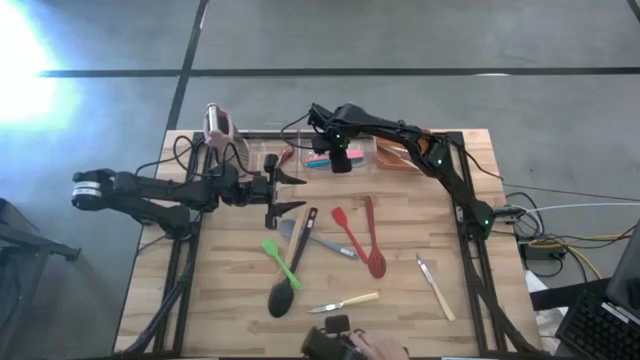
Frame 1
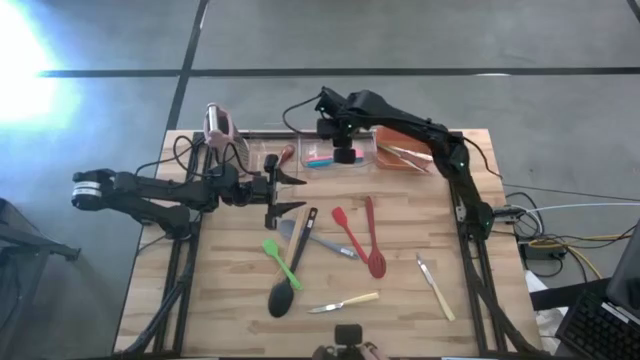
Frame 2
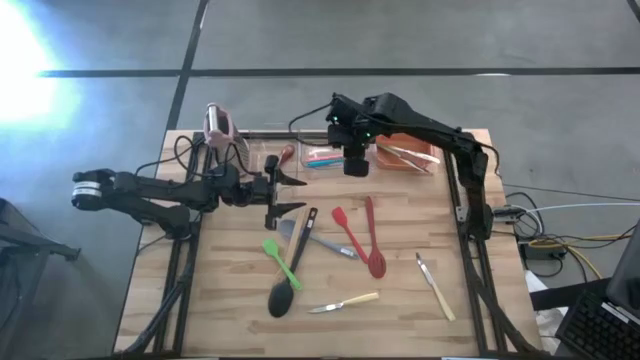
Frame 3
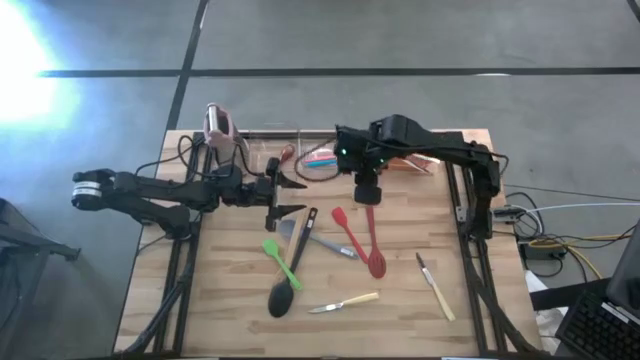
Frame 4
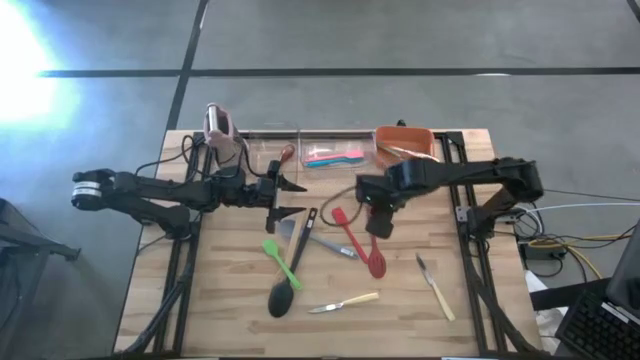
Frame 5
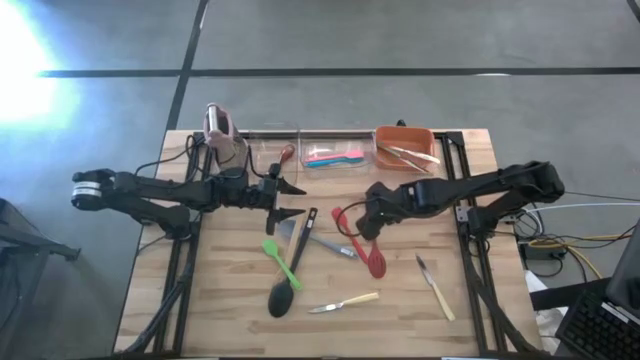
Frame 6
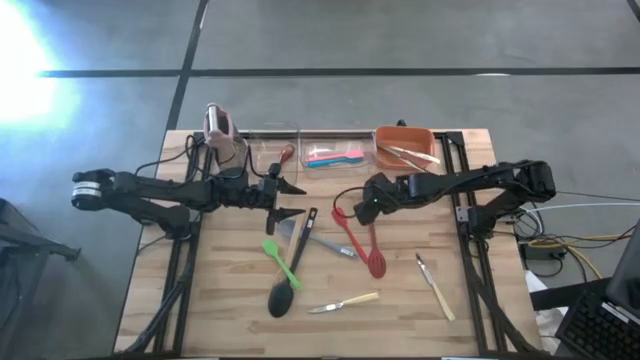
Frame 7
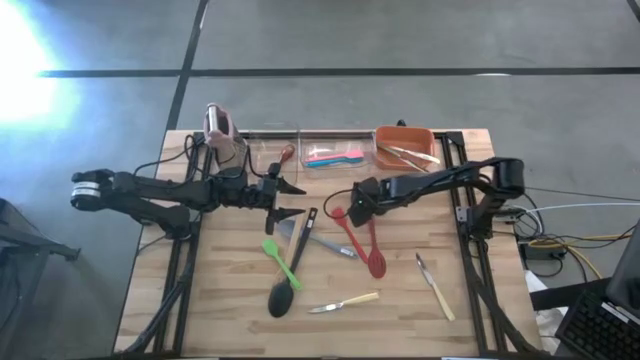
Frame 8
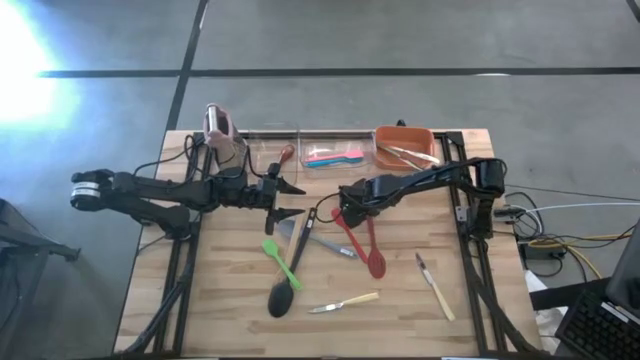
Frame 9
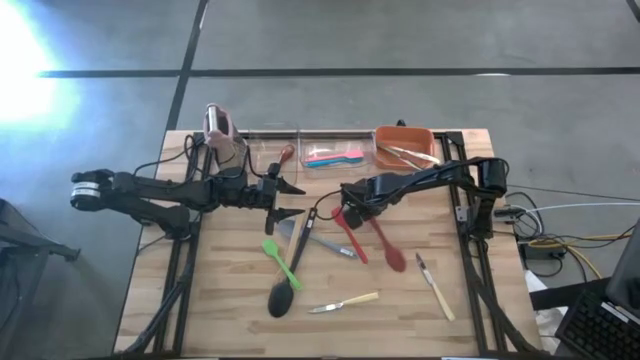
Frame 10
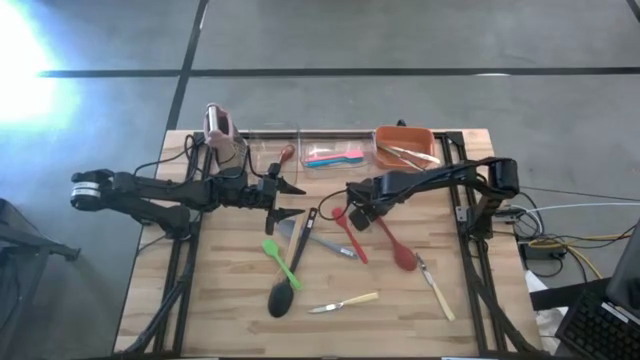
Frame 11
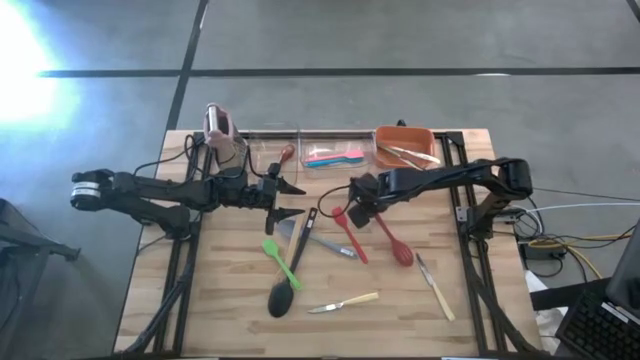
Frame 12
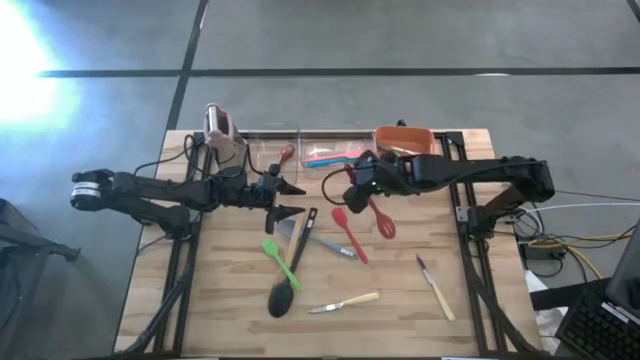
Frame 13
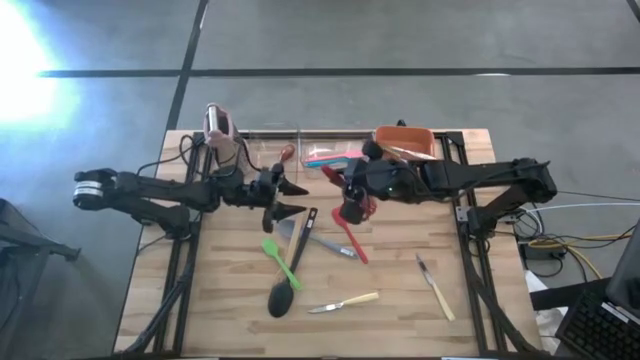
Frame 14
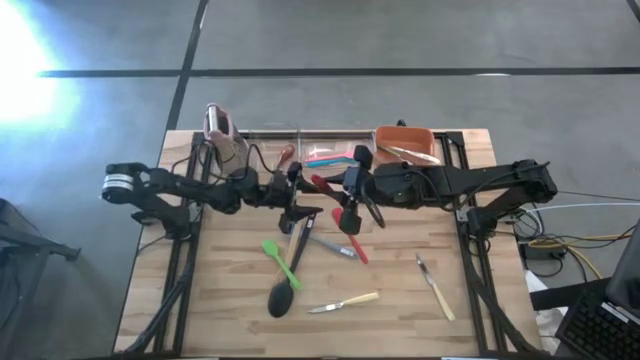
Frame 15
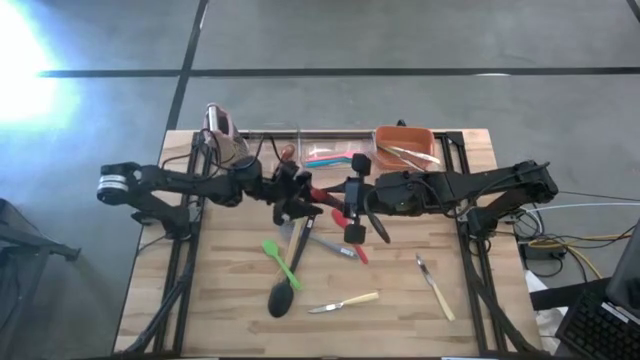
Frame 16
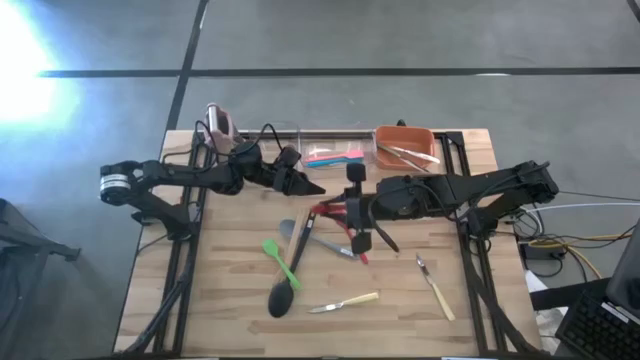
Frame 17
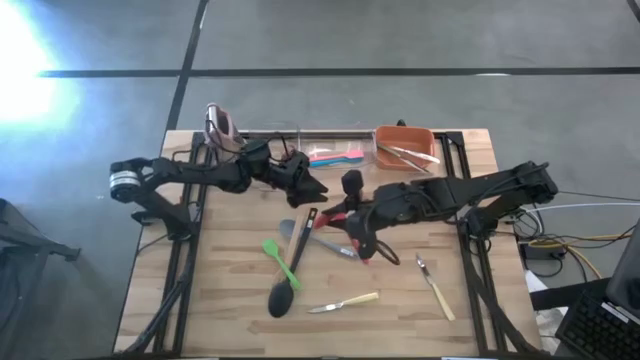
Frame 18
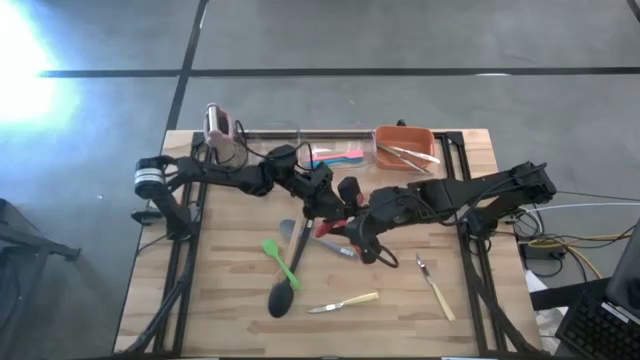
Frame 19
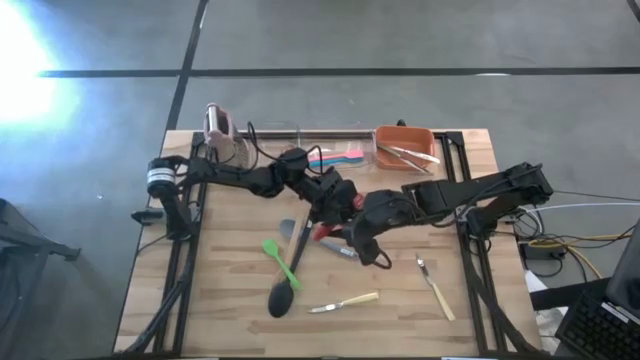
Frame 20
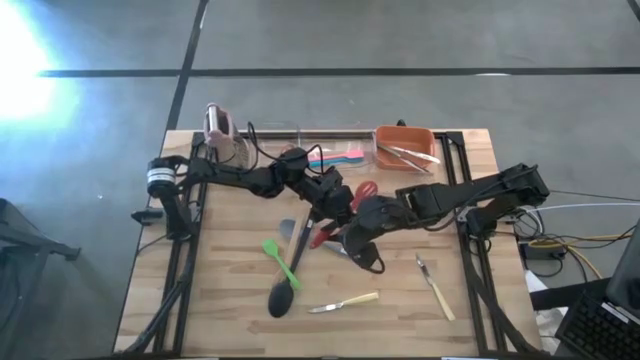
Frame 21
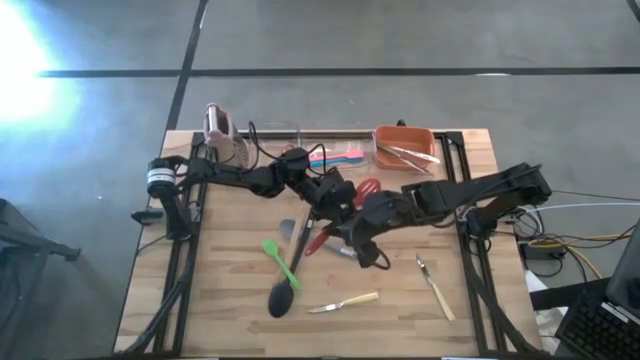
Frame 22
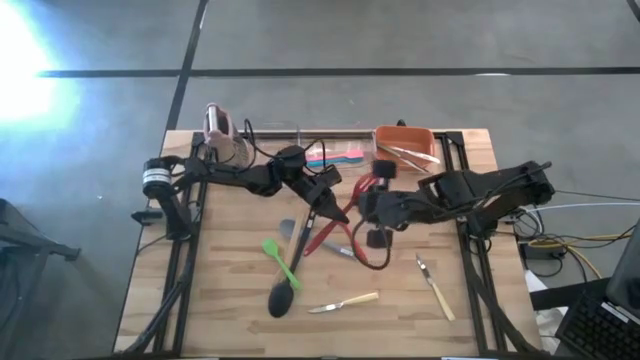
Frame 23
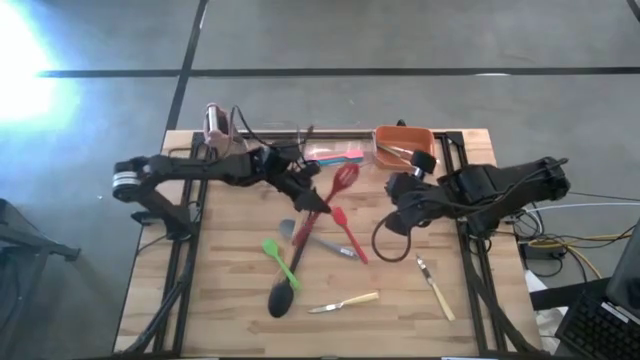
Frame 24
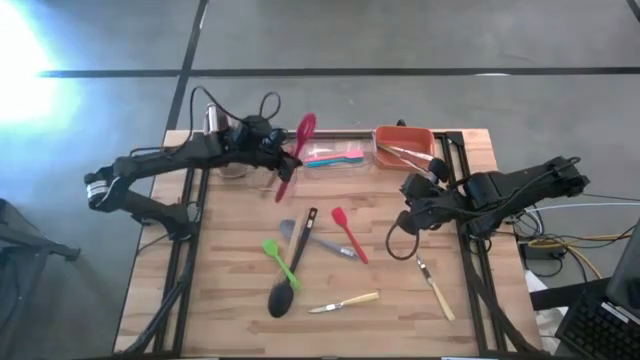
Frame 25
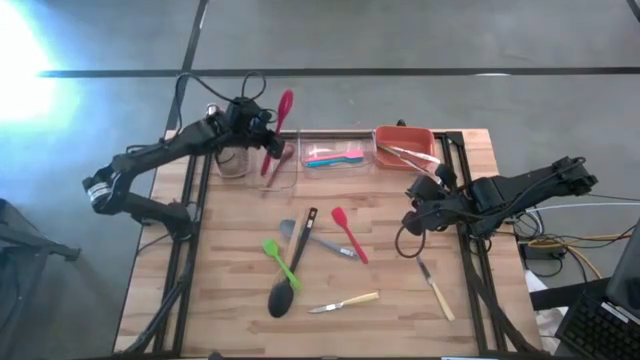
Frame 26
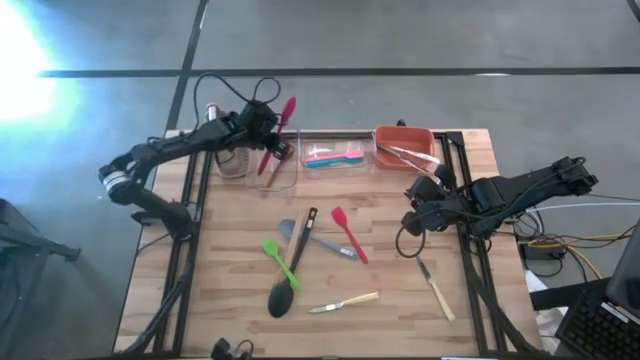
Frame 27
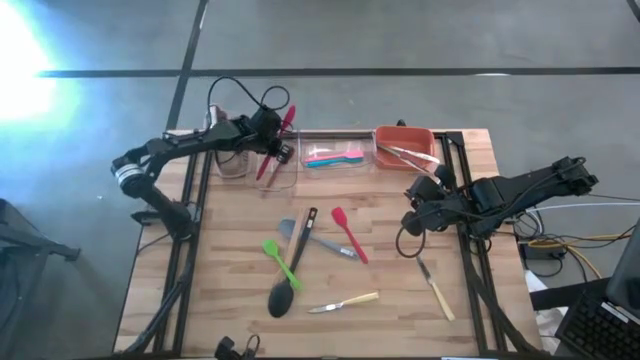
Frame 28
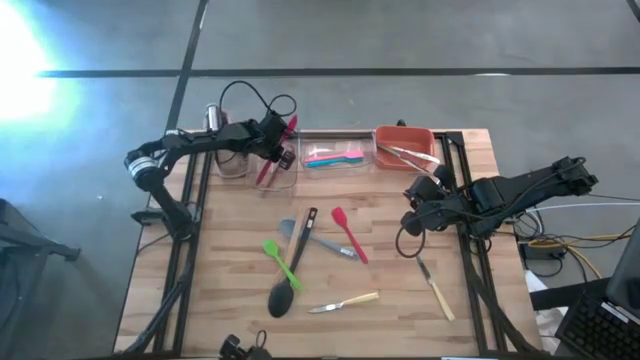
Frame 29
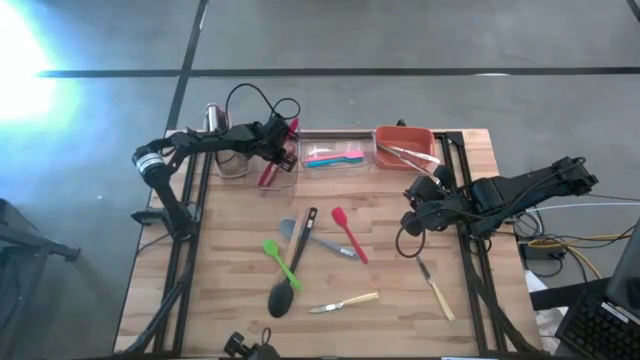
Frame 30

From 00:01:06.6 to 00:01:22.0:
Task: Pick & Place Kitchen Items
Put the red serving spoon into the left transparent bin

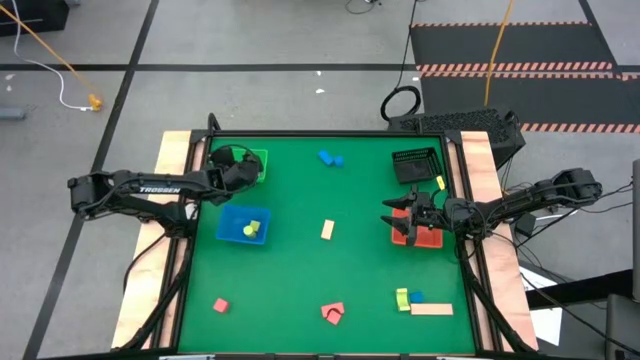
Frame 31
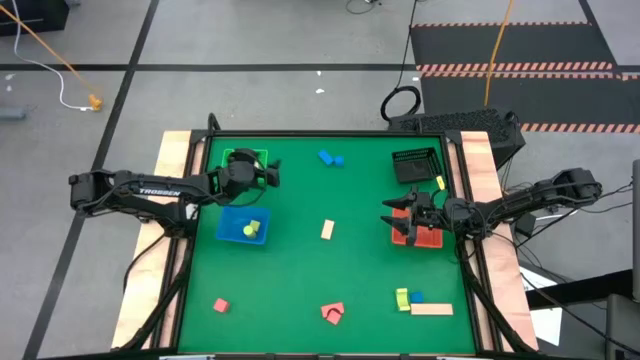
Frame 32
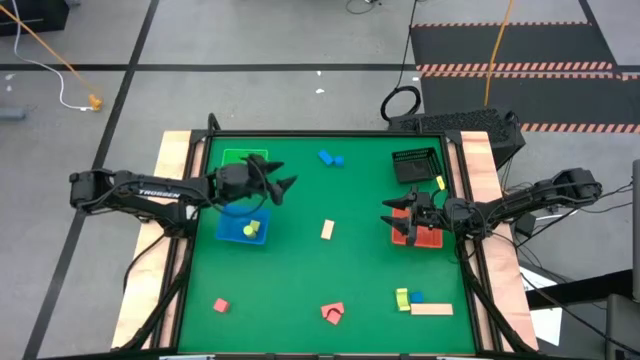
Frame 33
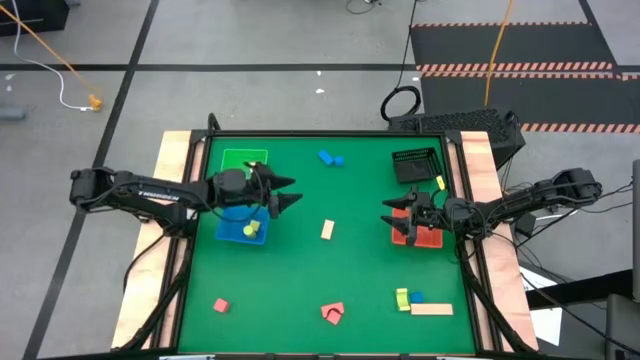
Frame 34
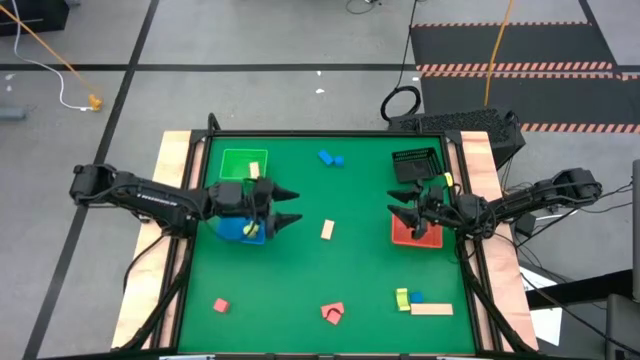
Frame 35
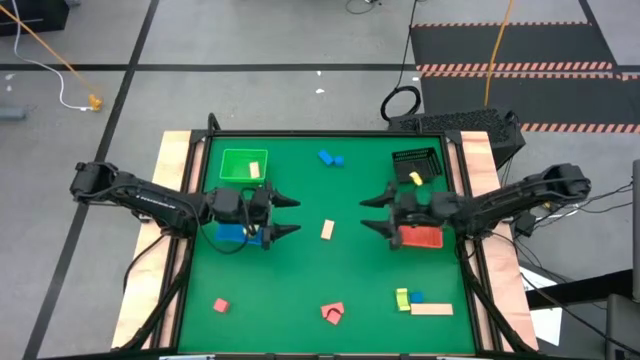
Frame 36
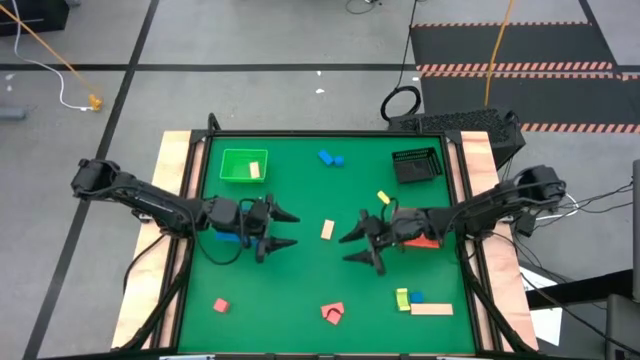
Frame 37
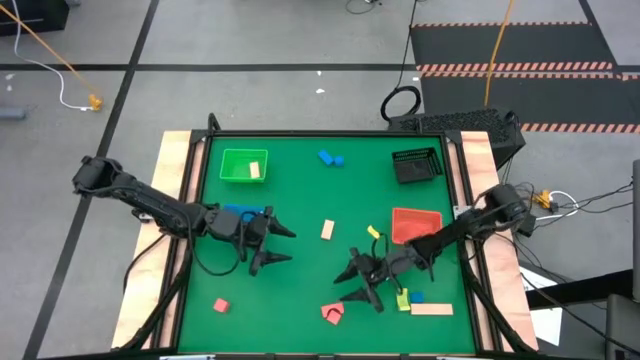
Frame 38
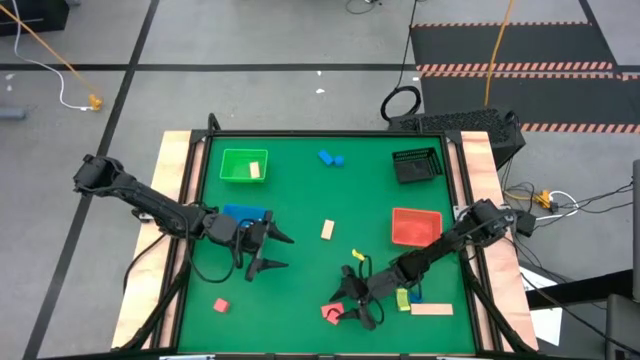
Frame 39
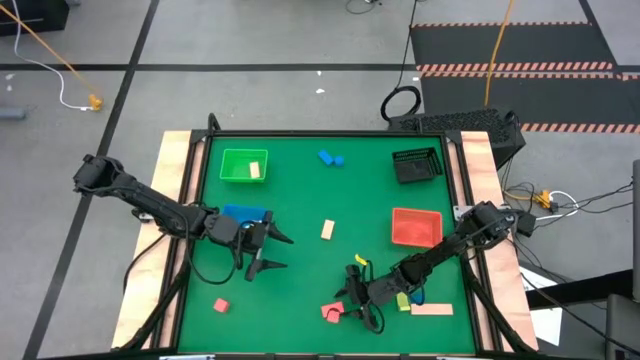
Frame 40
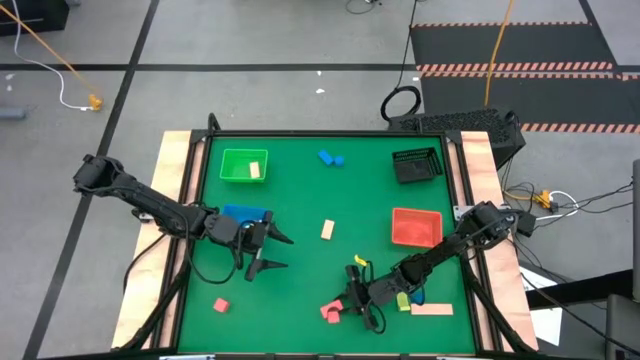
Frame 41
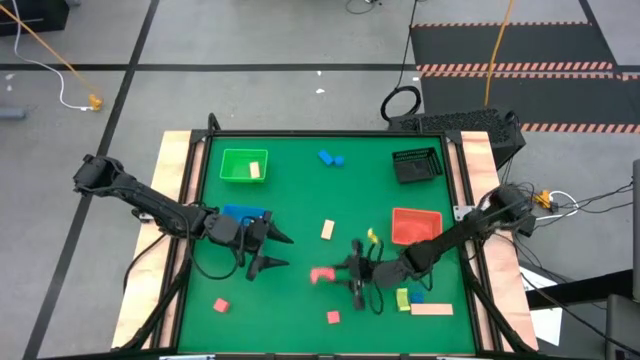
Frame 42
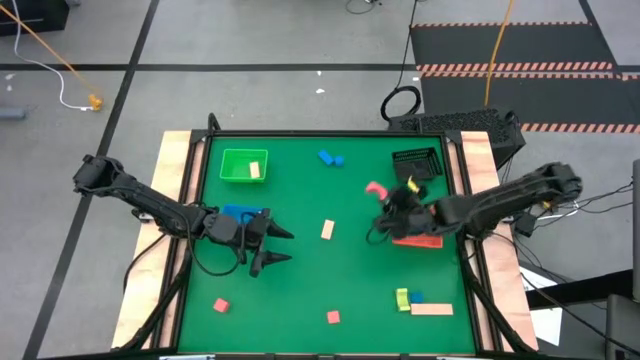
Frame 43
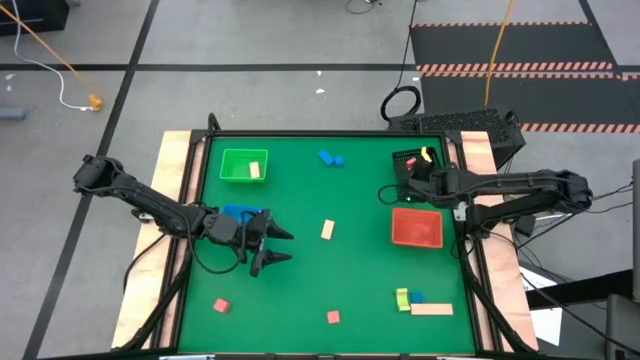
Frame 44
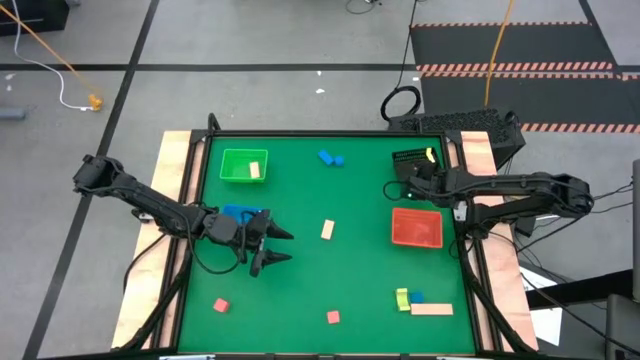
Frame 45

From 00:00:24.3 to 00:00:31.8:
Task: Sort & place blocks by color
Put the top right orange block into the black bin
